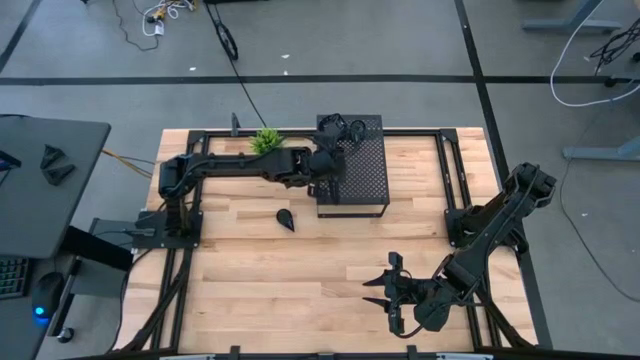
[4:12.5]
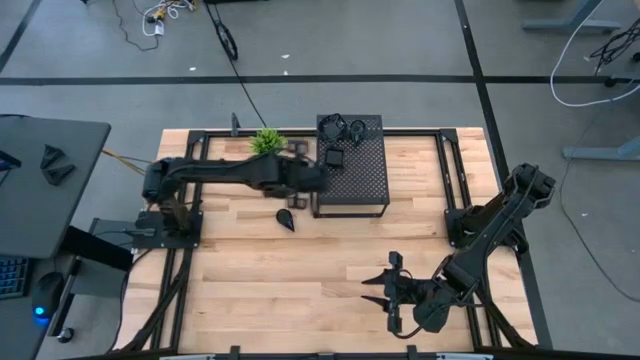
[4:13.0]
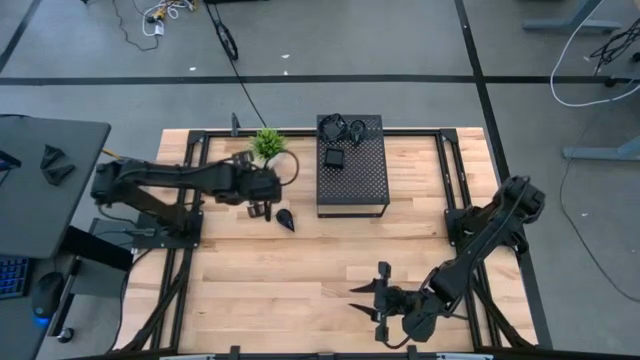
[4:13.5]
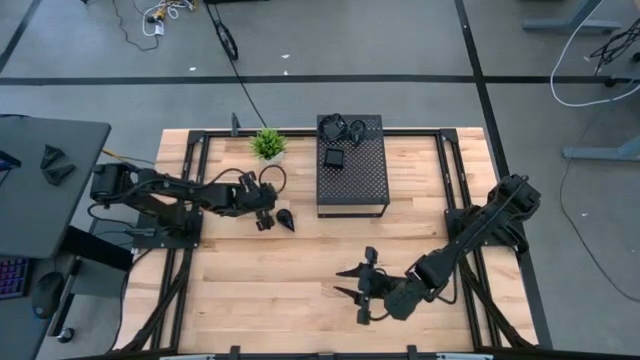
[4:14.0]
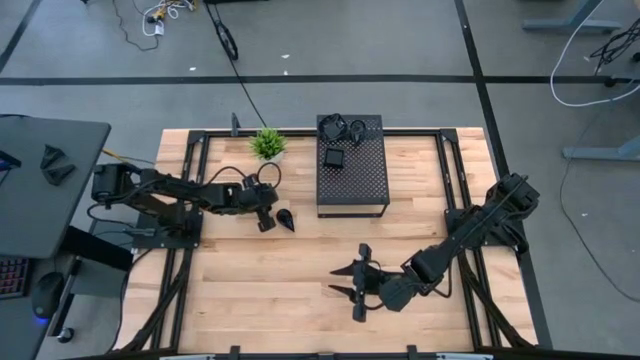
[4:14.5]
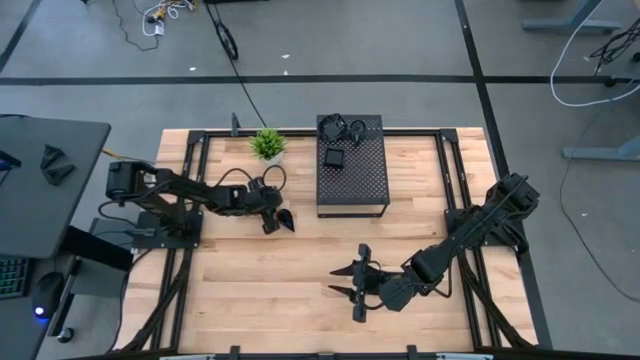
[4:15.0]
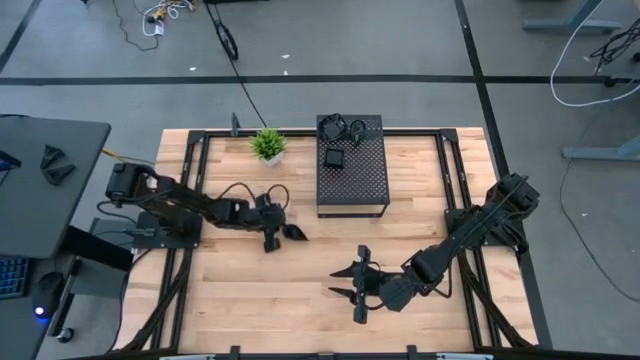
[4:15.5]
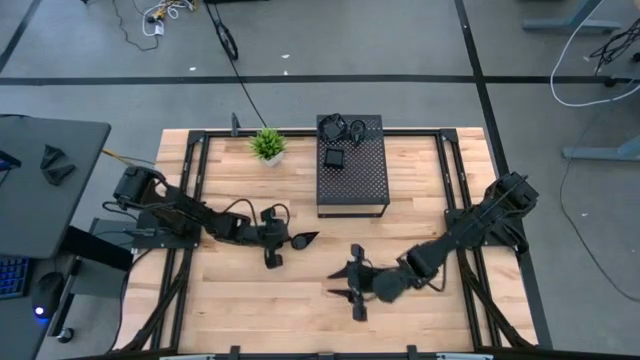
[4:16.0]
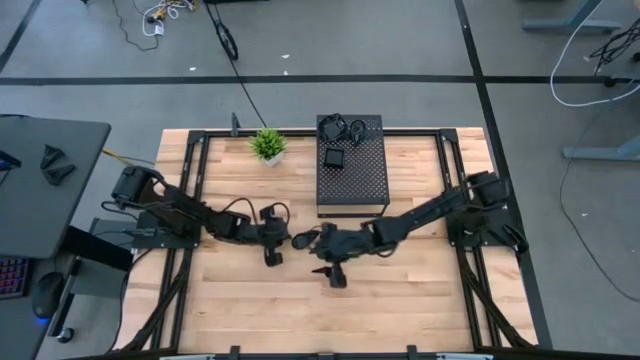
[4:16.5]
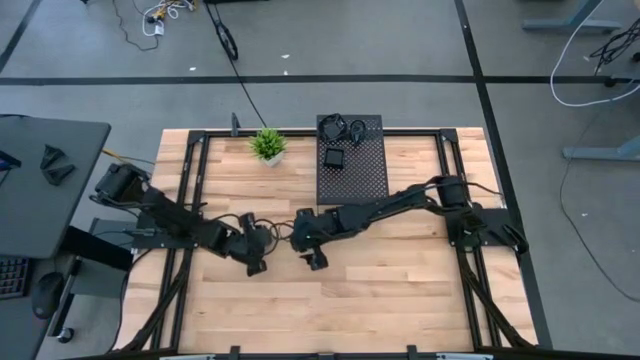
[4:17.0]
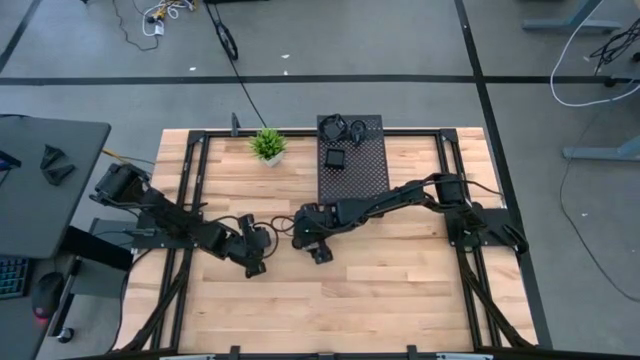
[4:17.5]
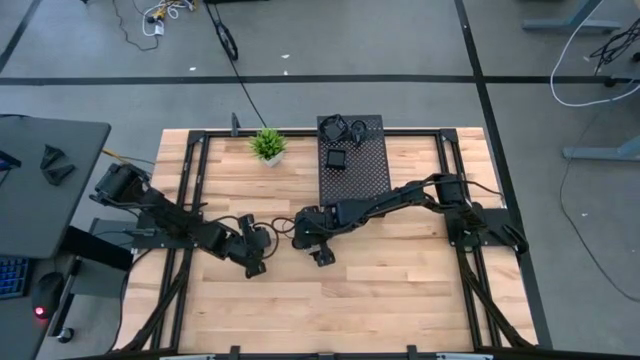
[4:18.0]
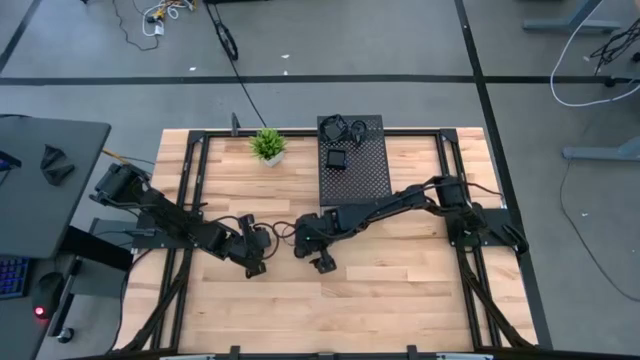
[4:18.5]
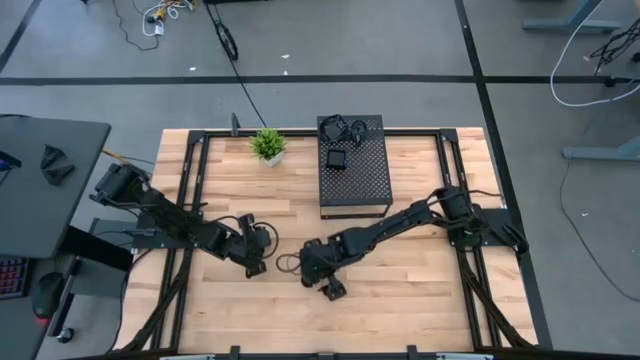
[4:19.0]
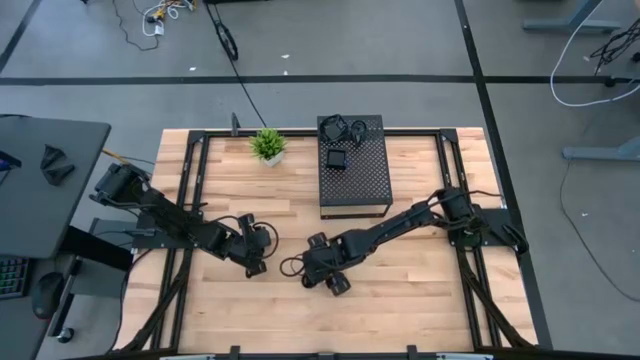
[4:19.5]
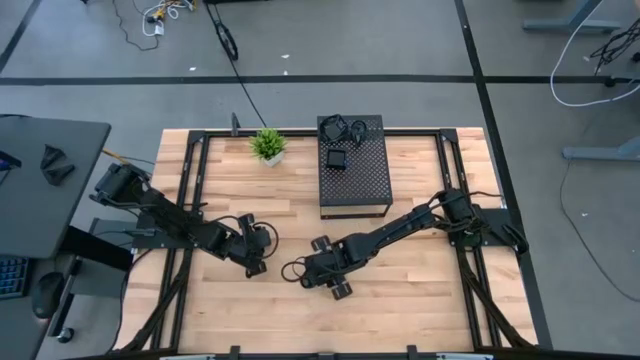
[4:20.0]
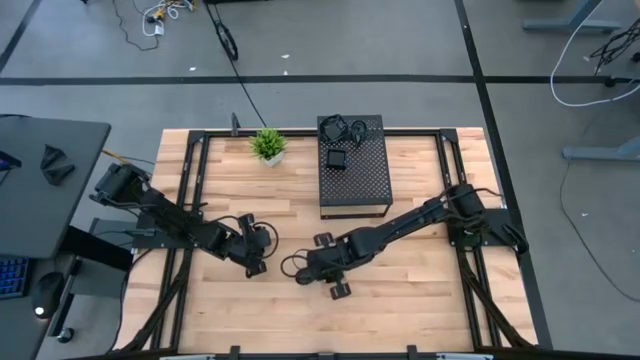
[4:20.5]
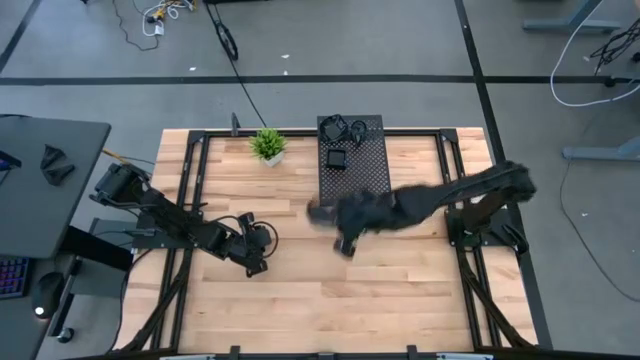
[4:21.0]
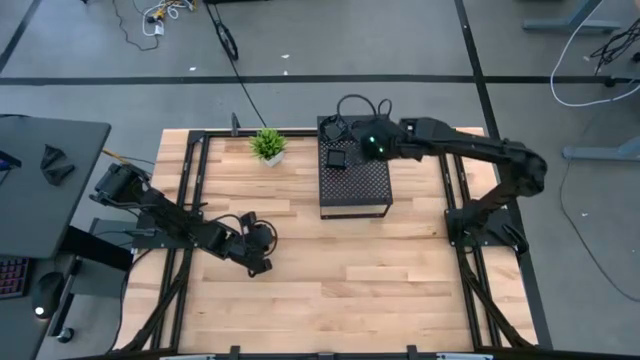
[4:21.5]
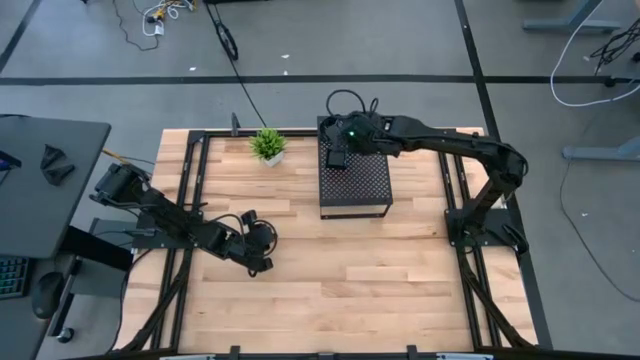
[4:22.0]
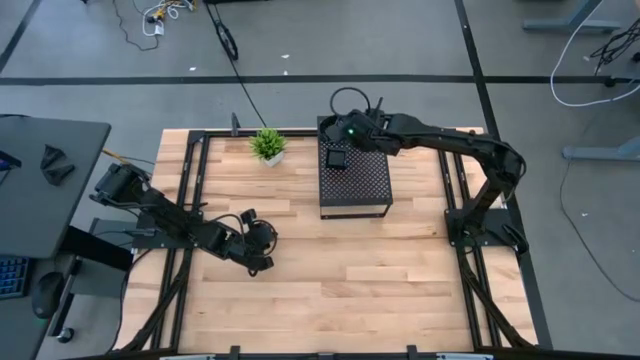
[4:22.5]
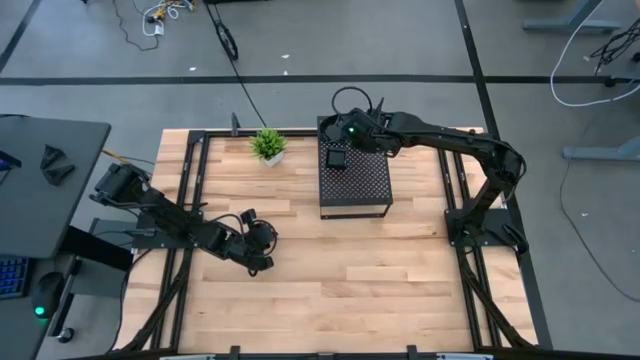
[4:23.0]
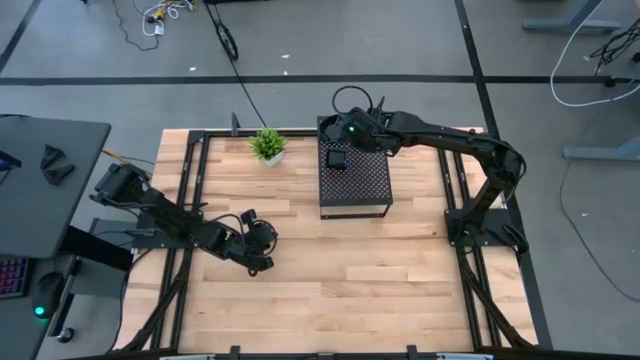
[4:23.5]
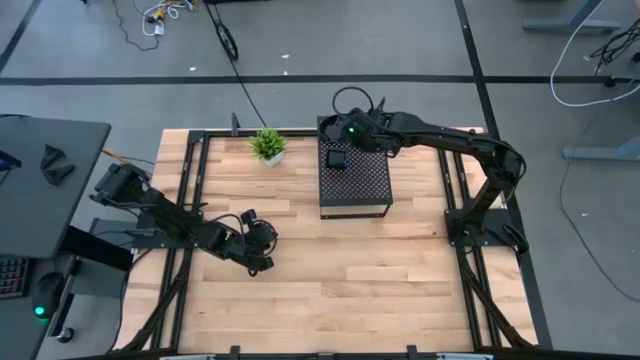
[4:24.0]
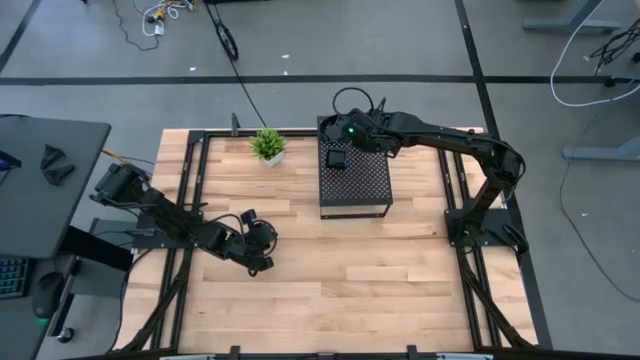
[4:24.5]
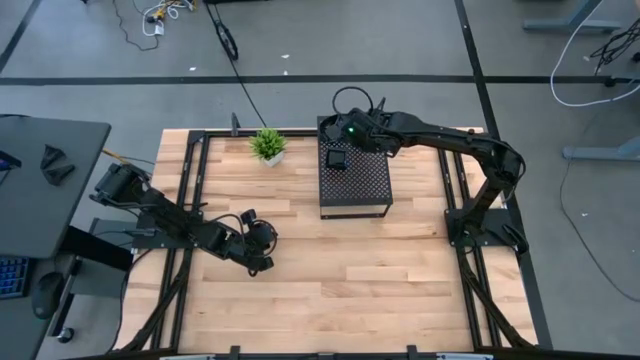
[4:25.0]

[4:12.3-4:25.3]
Task: Pick & Place Mini shaped plates
Stack the drop shaped plate on top of the drop shaped plate on the shelf

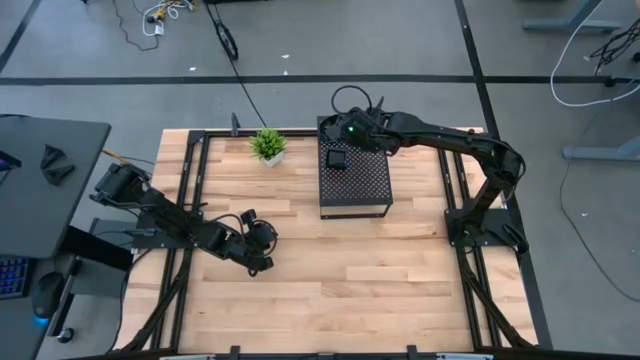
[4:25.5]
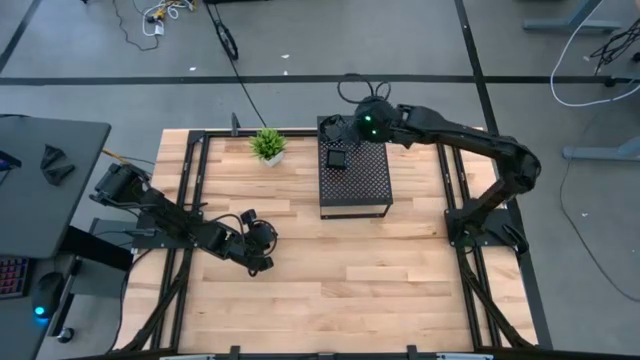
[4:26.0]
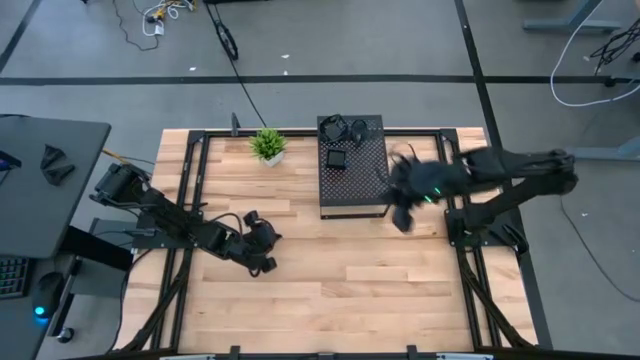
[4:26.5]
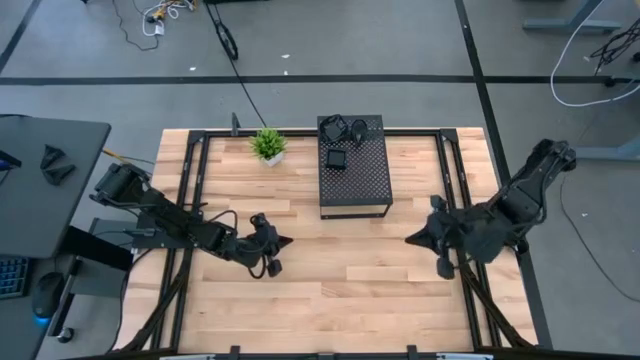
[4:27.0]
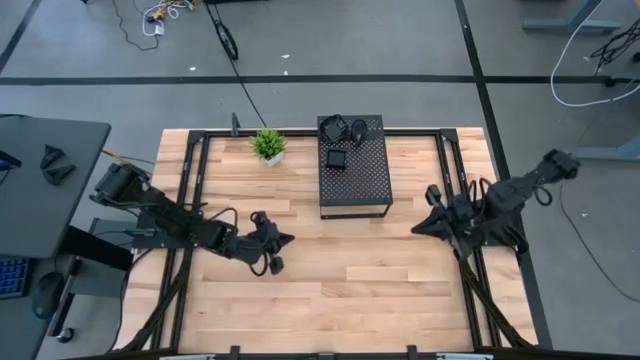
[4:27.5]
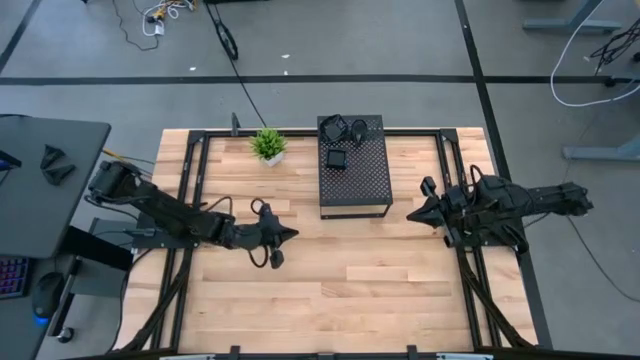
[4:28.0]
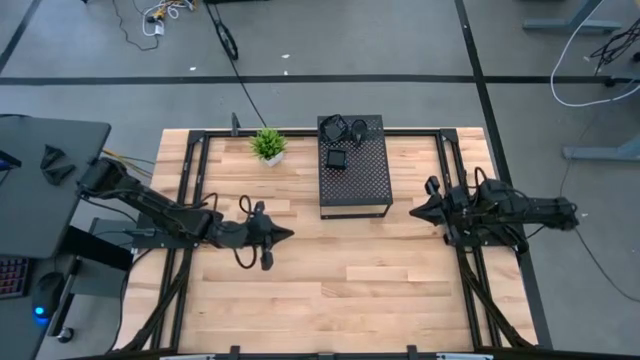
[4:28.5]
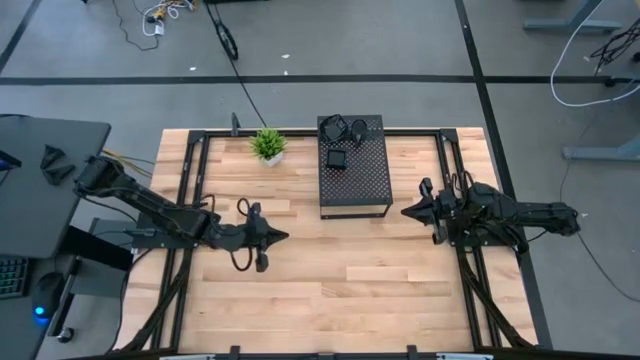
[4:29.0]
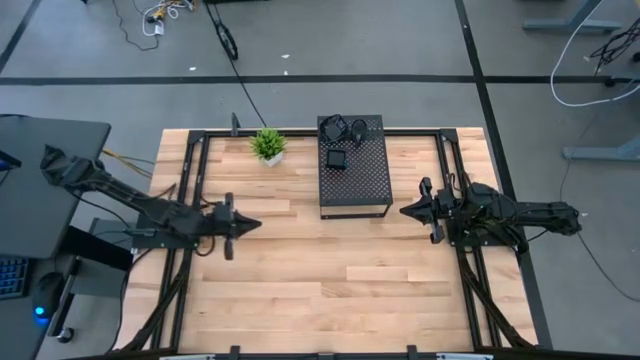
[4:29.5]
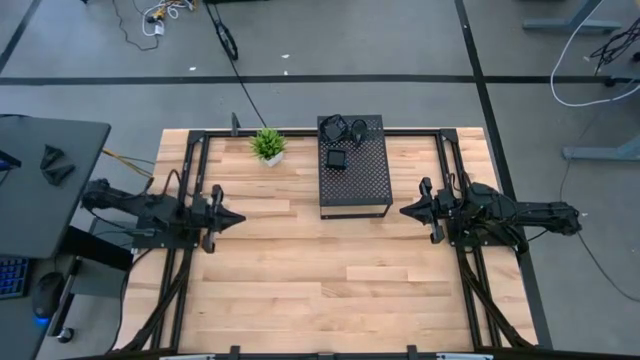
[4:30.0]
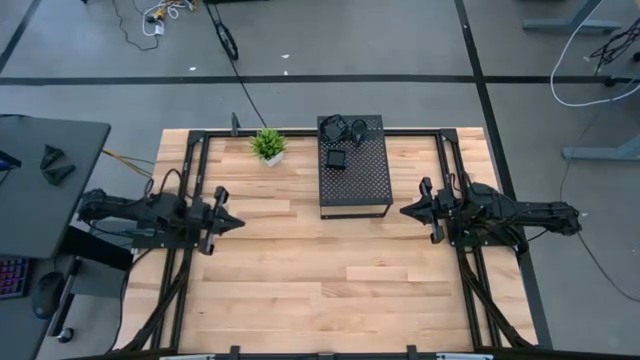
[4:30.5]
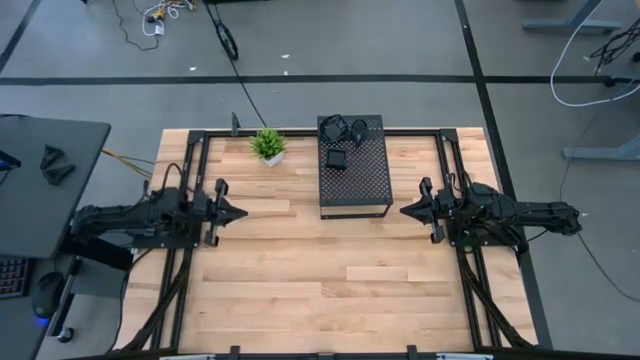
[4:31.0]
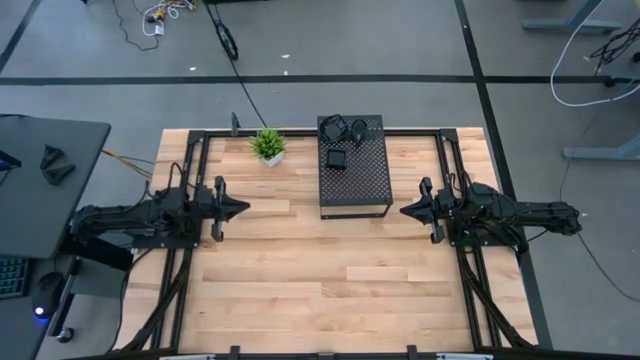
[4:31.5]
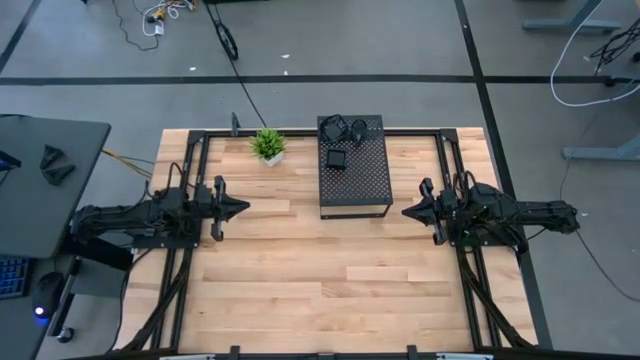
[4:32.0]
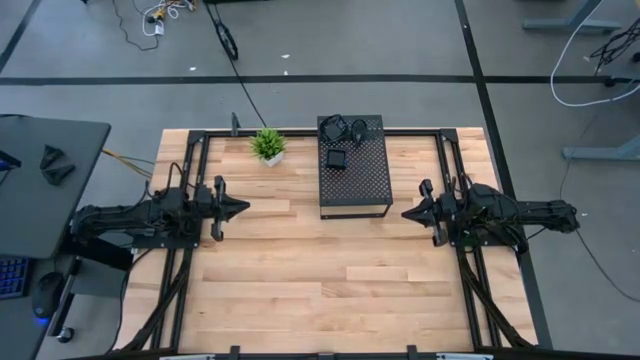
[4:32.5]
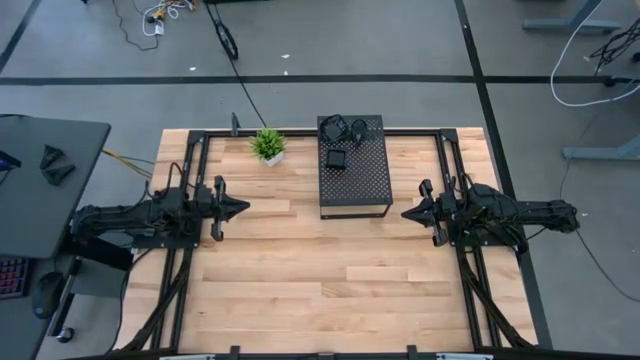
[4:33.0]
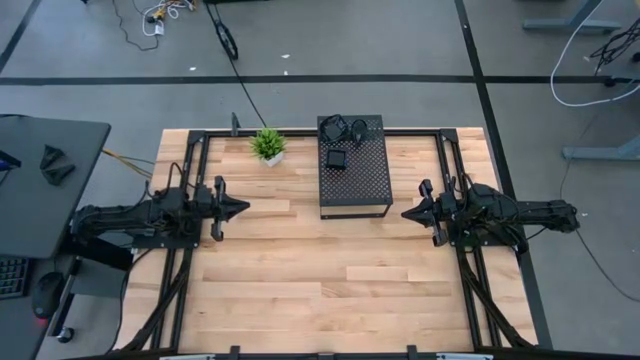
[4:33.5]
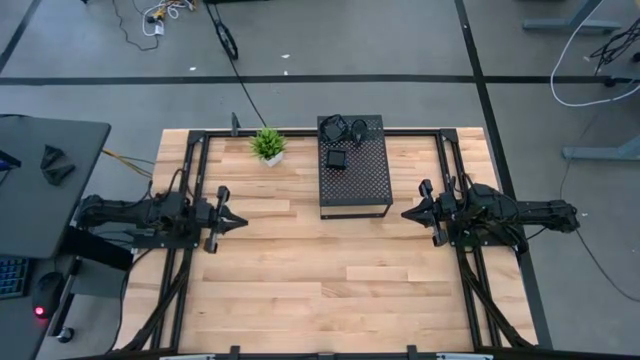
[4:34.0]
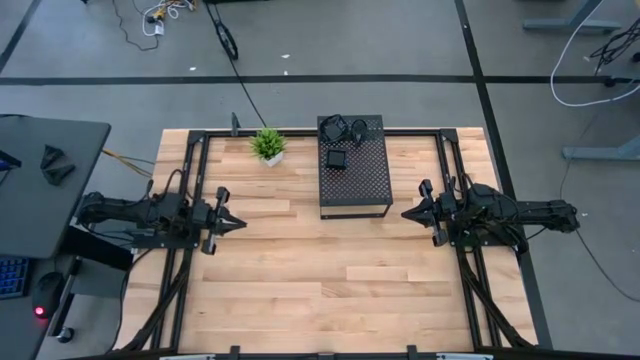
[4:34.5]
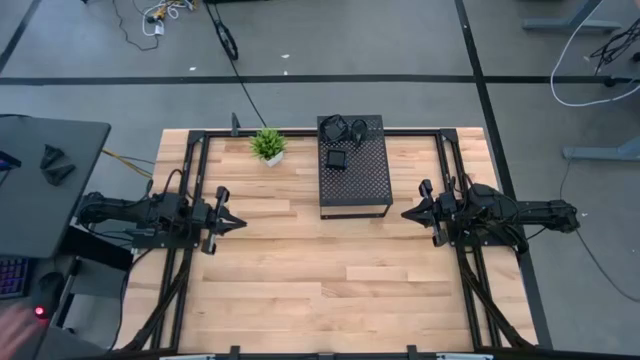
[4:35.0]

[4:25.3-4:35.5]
Return to Home Position
